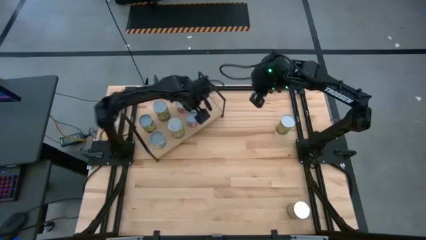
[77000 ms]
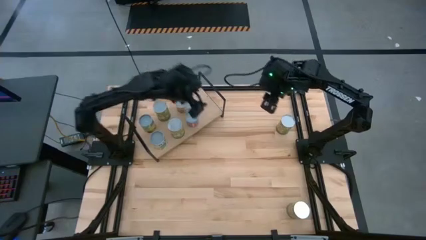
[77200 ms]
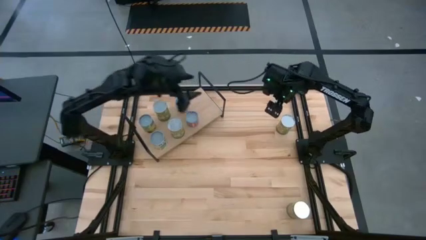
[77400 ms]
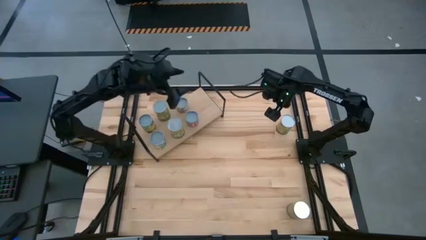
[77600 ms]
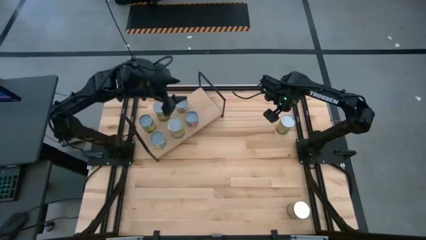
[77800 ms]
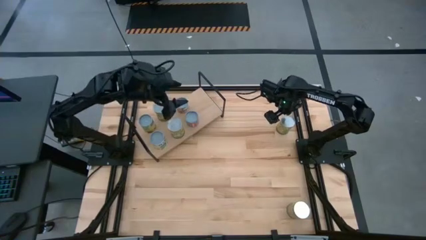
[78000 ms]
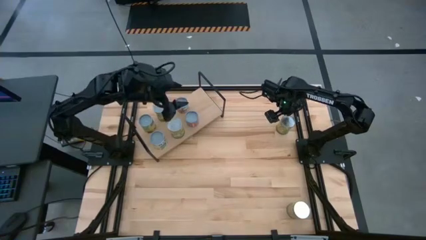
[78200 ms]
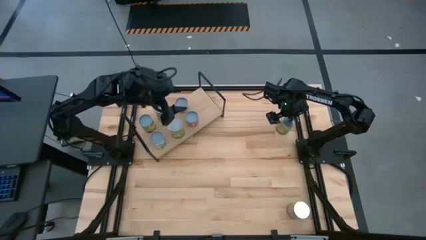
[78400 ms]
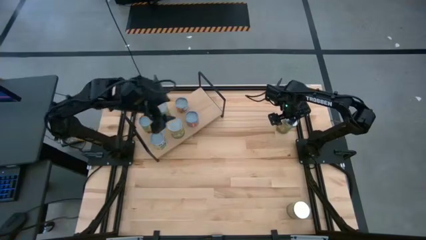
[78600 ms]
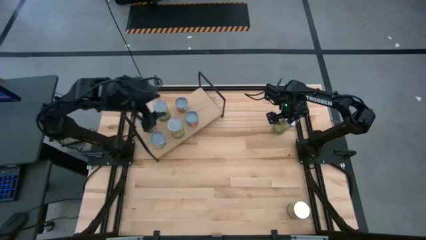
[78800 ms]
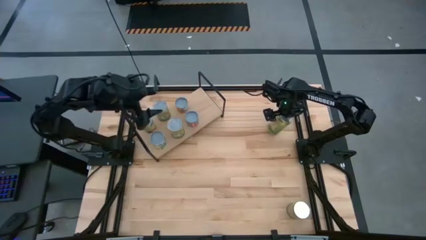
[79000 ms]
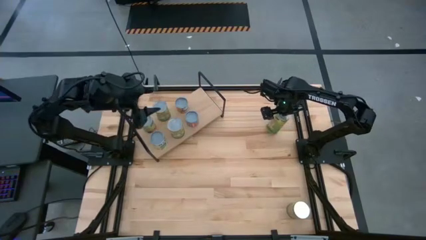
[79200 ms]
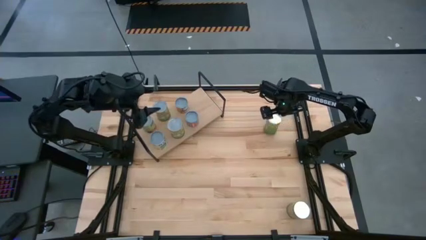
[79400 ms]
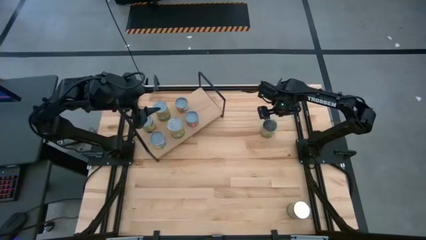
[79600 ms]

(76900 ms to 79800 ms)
Task: Pick and place cans onto a shelf
Put the large canned oranges on the shelf

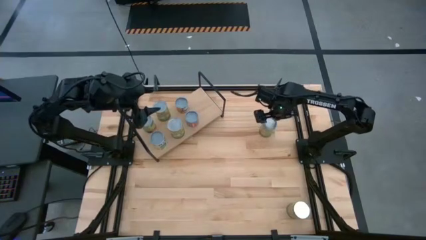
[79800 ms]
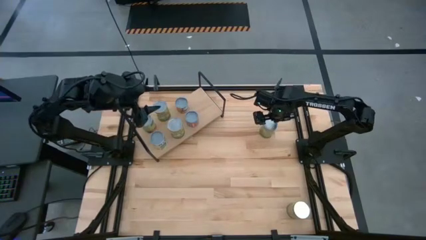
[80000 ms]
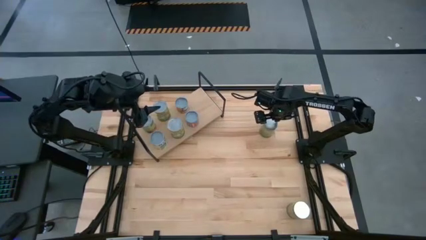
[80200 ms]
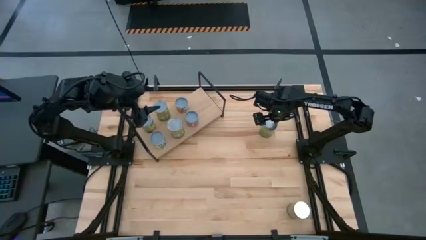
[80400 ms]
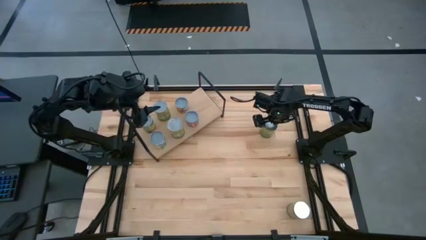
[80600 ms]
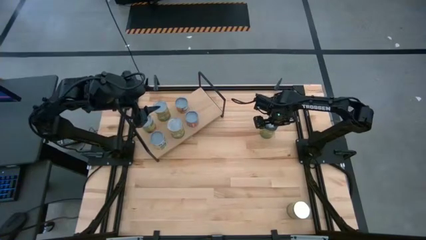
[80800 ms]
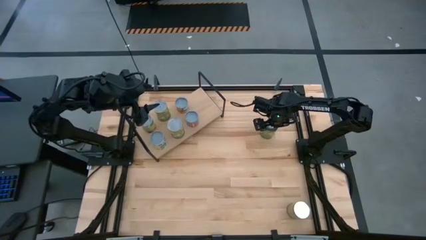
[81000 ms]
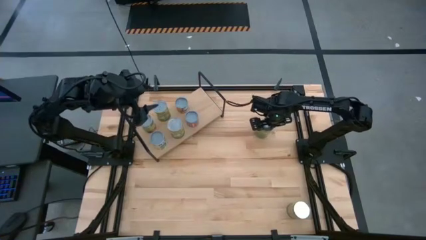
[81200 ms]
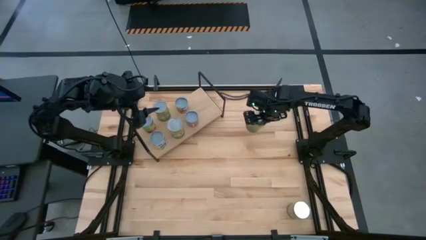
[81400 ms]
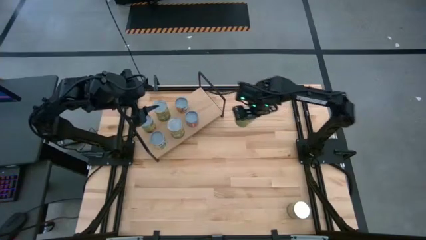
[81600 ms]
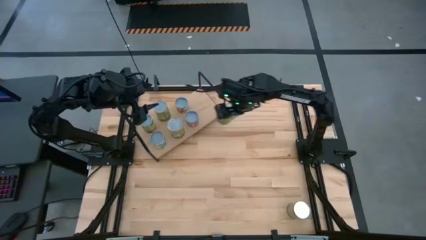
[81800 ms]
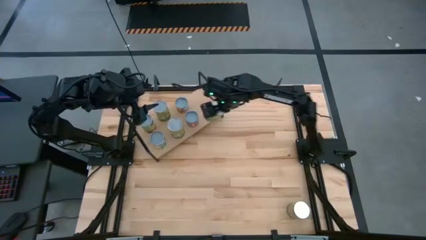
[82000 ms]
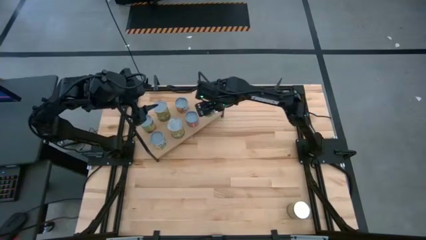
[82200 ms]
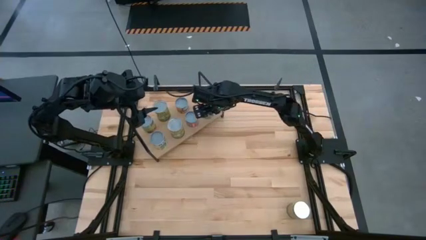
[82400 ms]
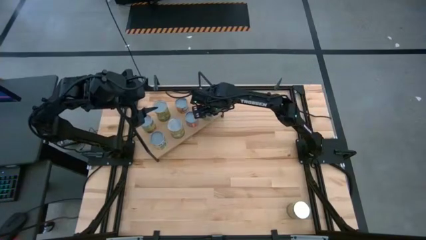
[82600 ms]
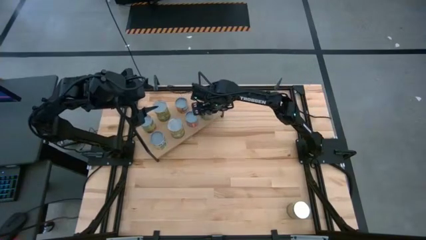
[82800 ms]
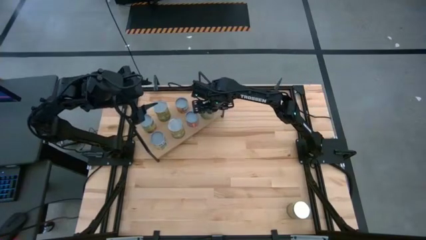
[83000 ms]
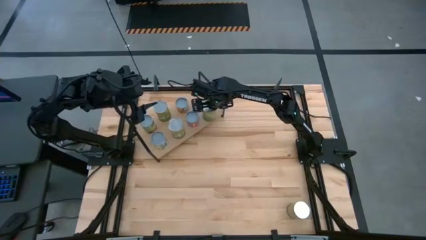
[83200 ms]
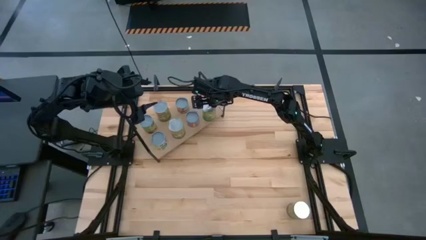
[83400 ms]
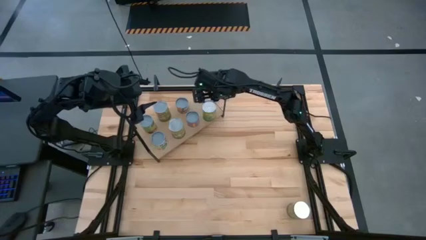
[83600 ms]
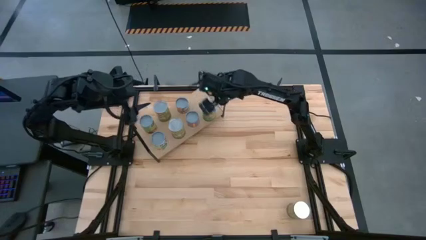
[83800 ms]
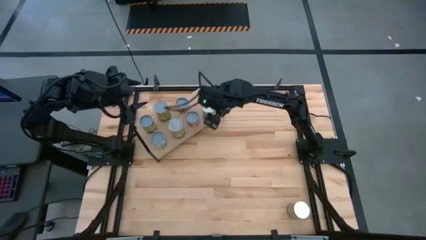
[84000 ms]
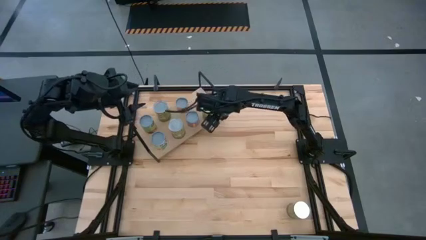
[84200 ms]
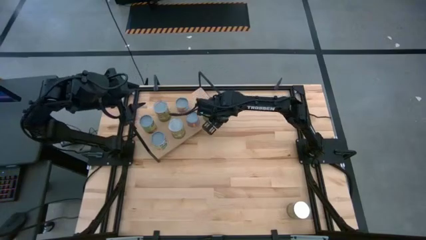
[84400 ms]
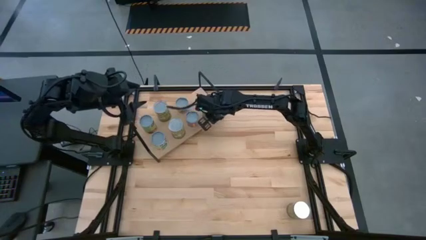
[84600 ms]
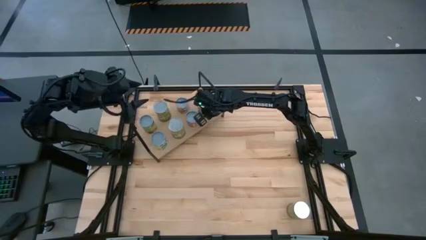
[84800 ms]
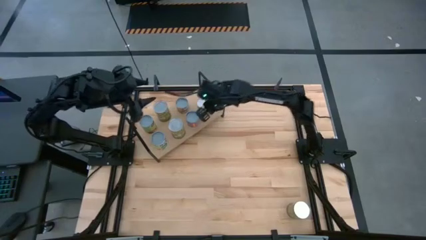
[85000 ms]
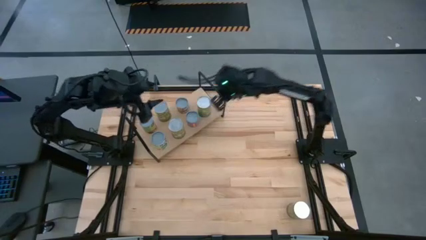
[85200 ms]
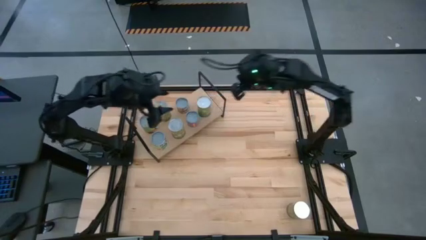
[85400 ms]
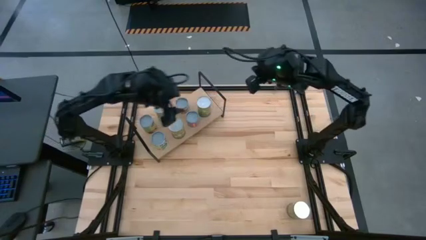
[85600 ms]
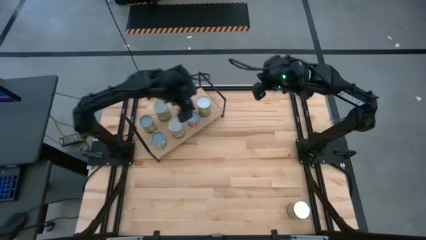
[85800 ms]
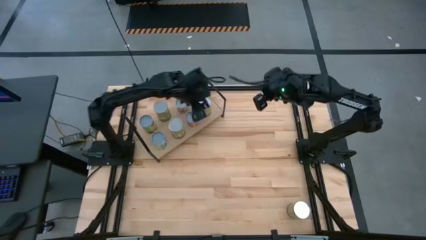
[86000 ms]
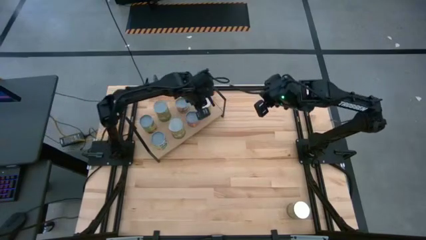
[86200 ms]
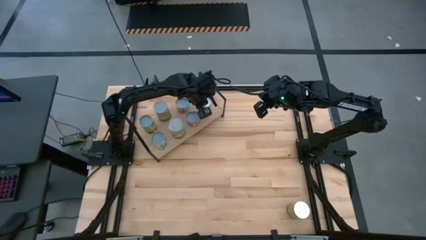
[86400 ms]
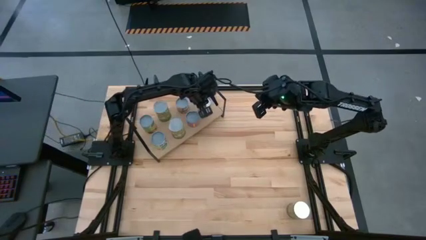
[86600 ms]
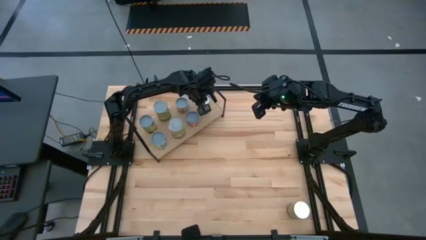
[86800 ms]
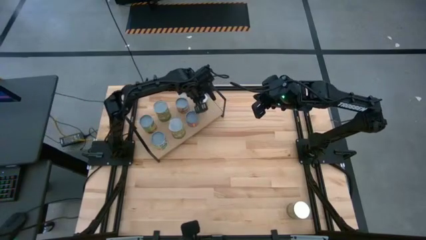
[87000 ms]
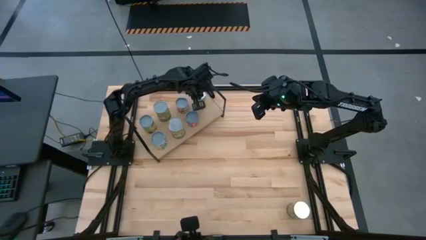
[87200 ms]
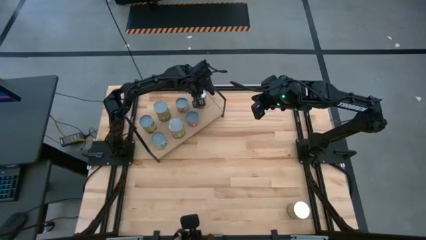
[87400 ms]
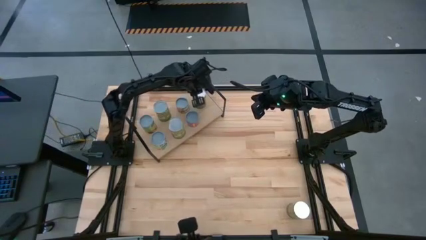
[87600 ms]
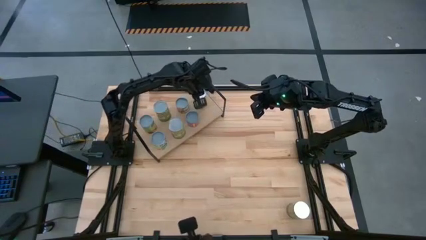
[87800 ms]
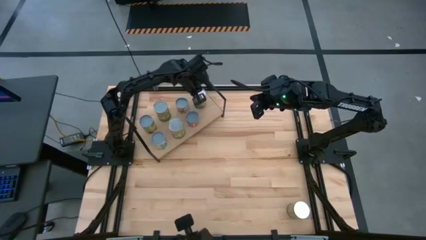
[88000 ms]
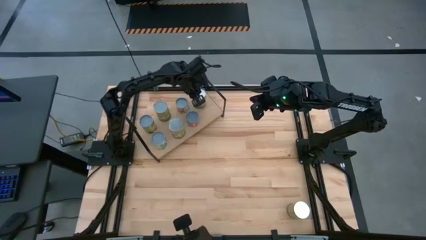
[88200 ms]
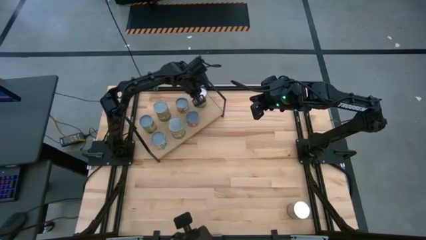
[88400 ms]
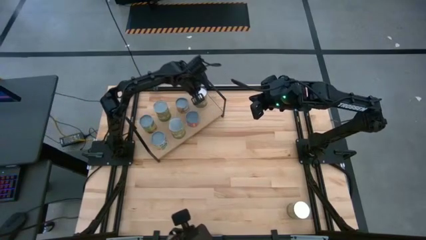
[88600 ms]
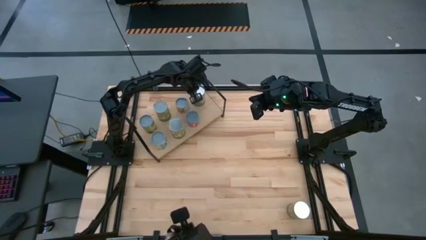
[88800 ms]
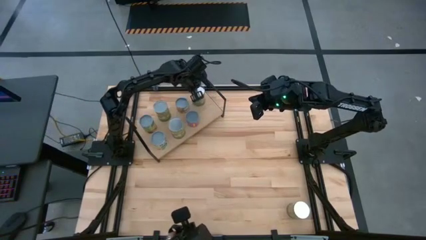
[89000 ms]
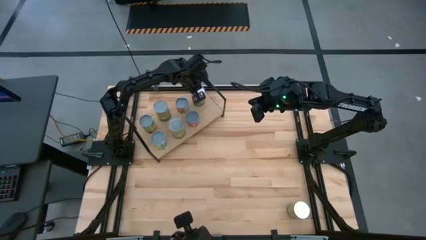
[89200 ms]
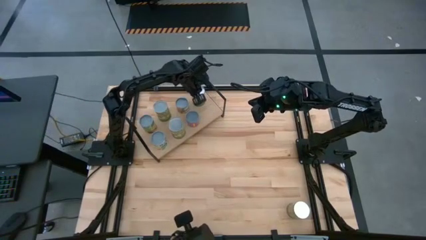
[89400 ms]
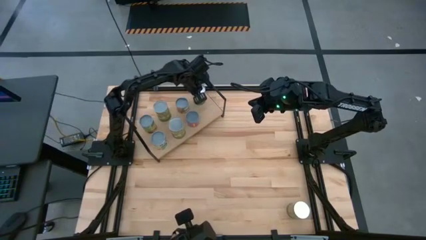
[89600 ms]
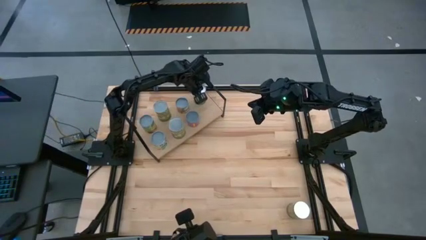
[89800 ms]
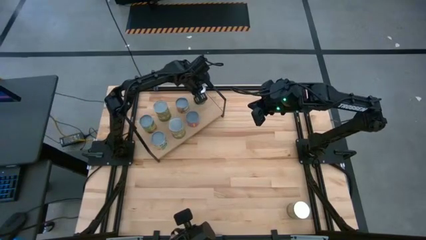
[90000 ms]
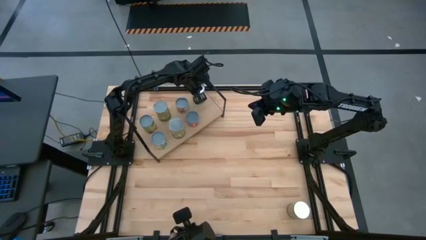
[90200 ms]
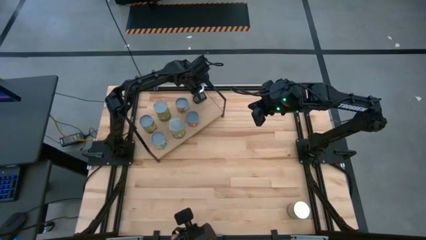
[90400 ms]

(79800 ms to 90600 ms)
Put the large canned oranges on the shelf

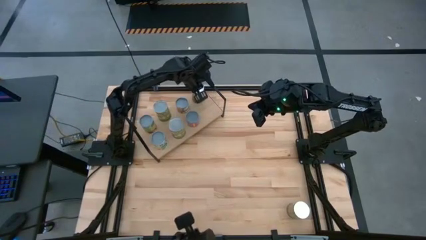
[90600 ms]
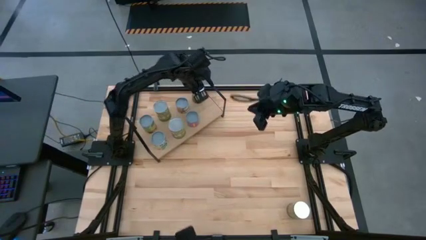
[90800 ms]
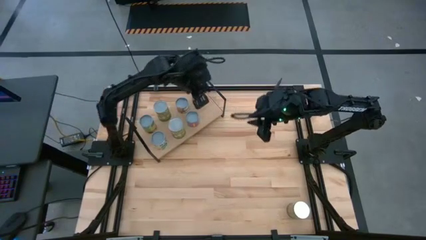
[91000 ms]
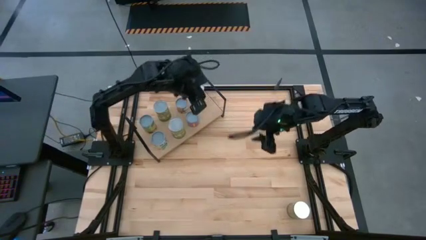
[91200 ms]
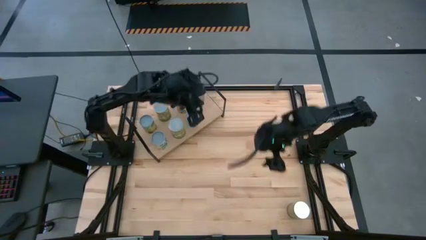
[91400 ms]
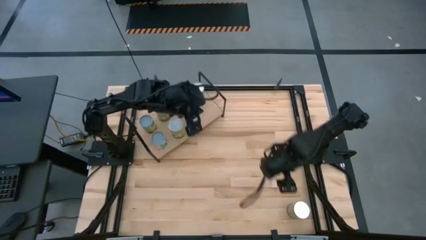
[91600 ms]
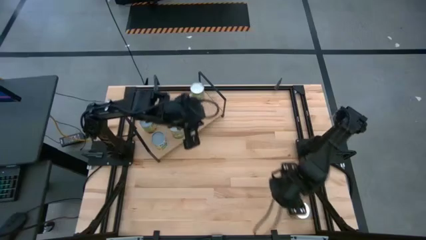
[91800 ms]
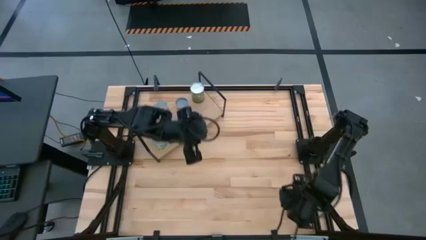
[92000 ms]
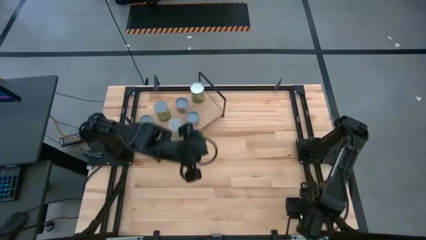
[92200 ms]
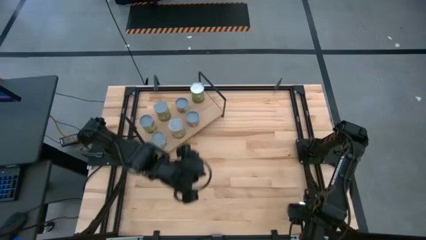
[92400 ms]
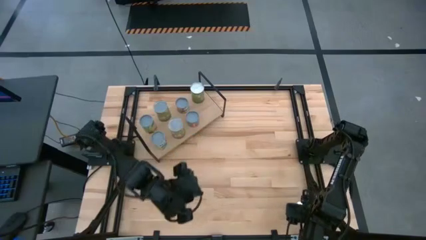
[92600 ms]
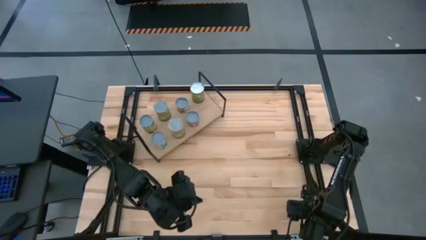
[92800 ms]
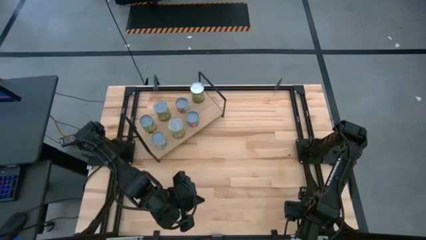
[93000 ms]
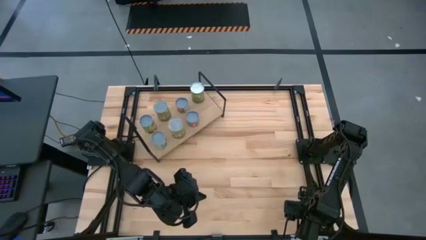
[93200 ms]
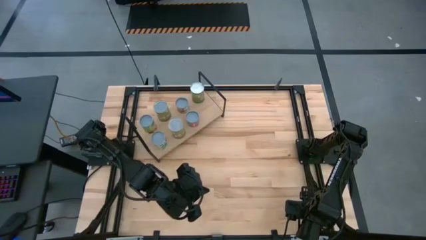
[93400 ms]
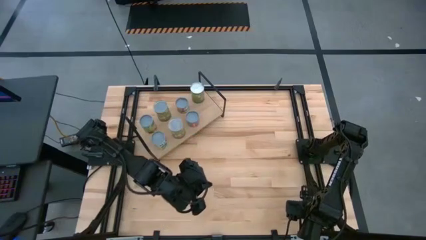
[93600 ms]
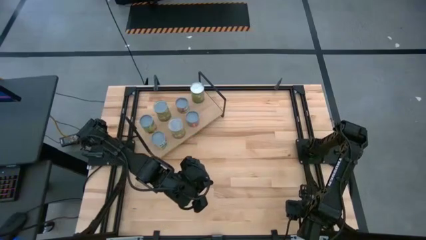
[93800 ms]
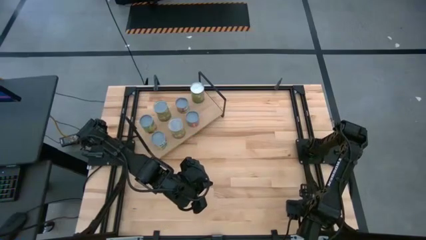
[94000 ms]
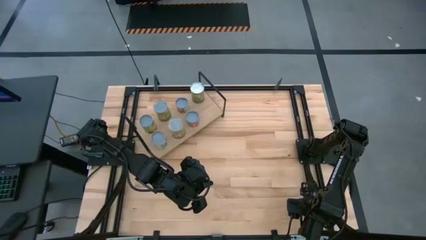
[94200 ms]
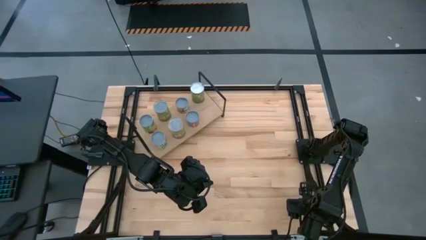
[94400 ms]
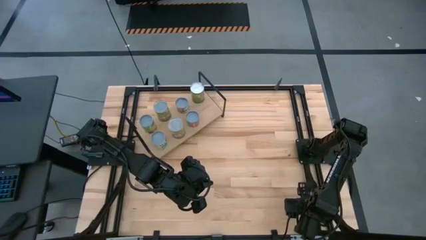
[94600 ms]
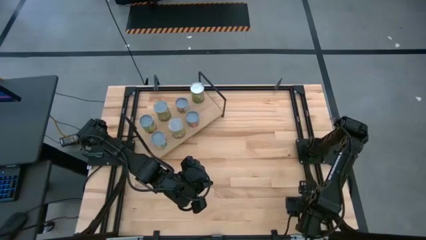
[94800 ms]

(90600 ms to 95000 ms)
Put the canned oranges on the shelf
